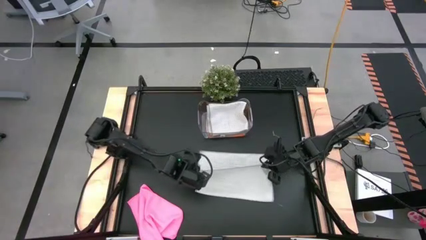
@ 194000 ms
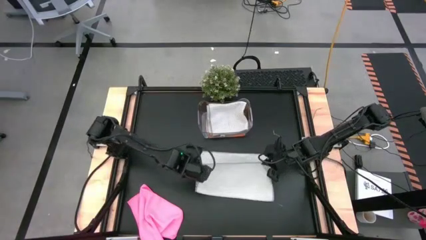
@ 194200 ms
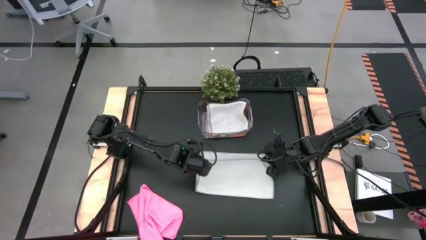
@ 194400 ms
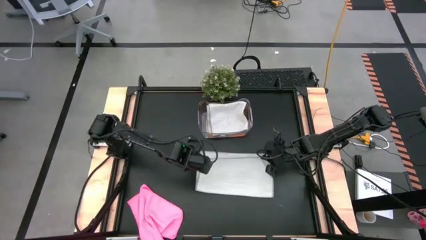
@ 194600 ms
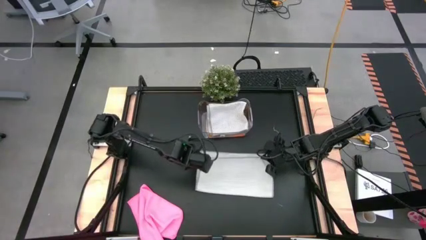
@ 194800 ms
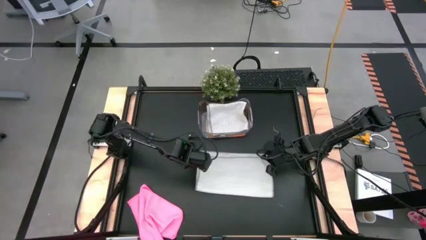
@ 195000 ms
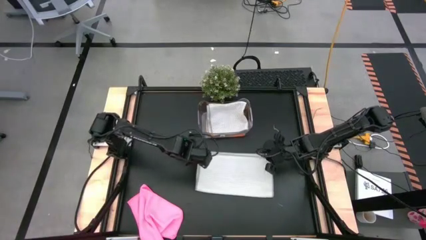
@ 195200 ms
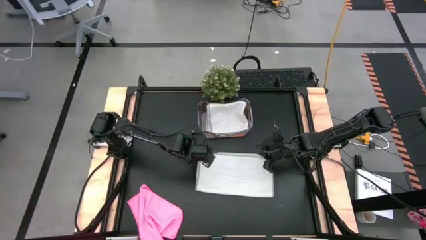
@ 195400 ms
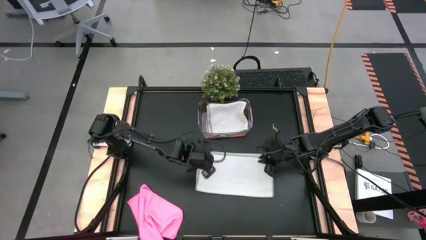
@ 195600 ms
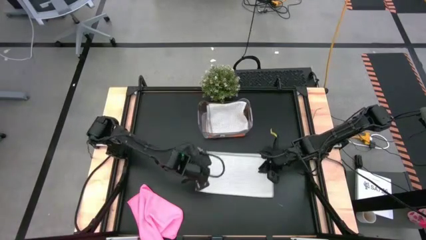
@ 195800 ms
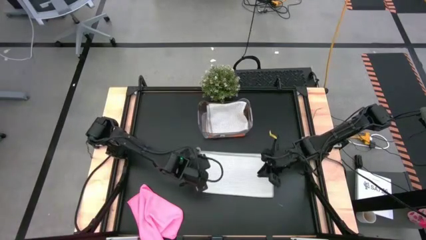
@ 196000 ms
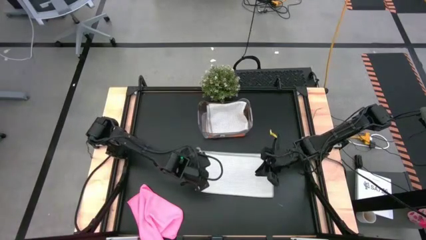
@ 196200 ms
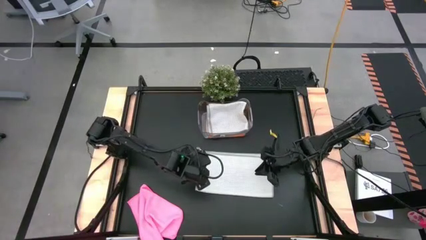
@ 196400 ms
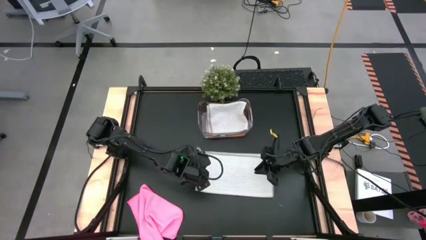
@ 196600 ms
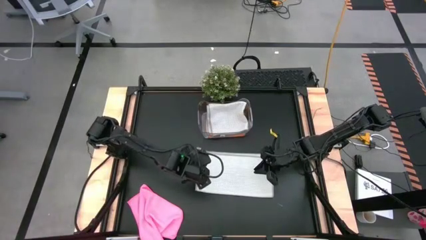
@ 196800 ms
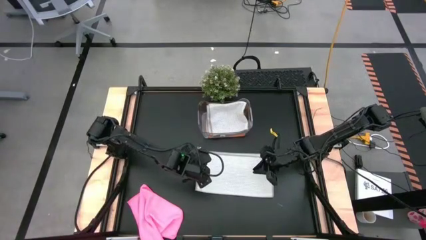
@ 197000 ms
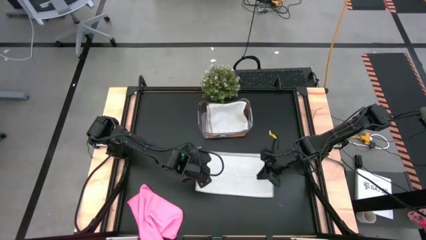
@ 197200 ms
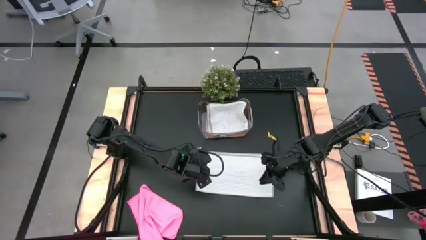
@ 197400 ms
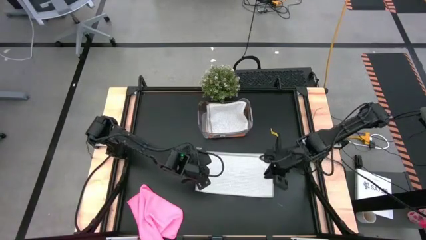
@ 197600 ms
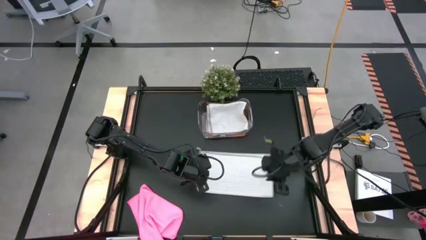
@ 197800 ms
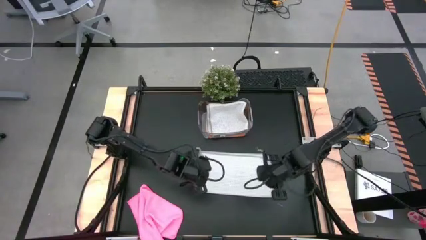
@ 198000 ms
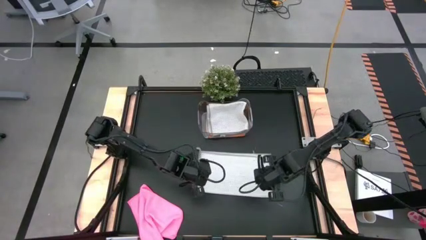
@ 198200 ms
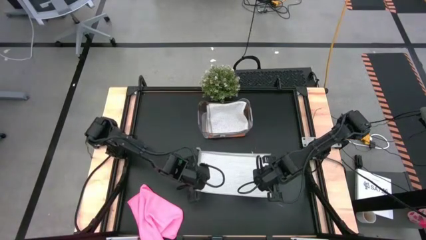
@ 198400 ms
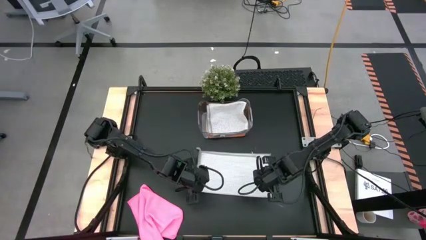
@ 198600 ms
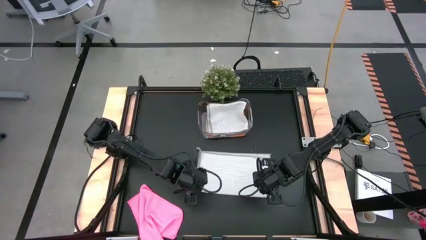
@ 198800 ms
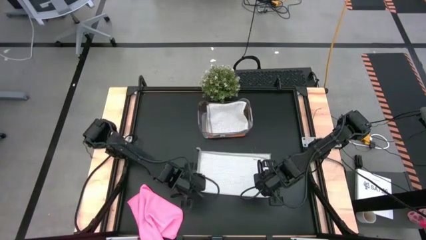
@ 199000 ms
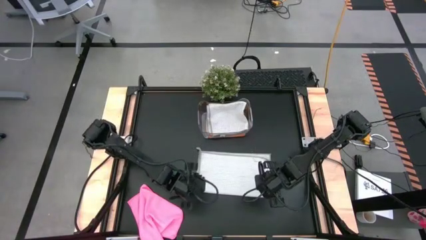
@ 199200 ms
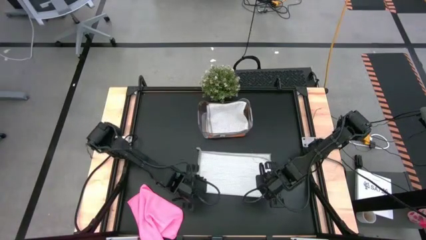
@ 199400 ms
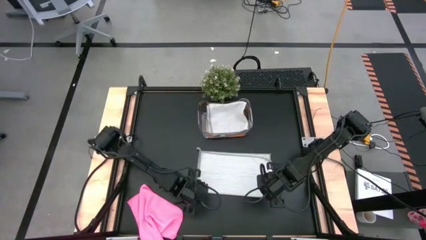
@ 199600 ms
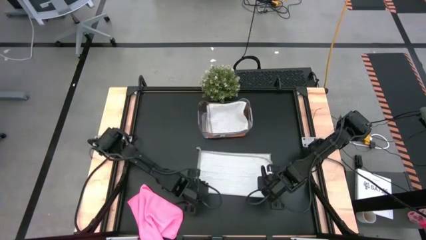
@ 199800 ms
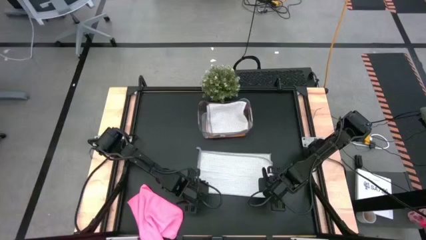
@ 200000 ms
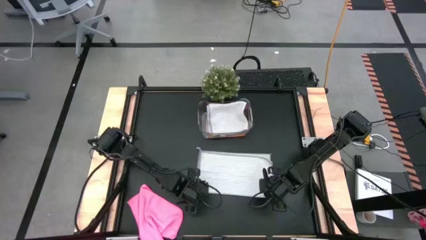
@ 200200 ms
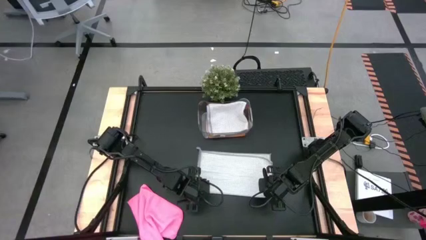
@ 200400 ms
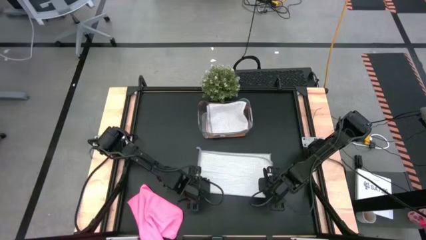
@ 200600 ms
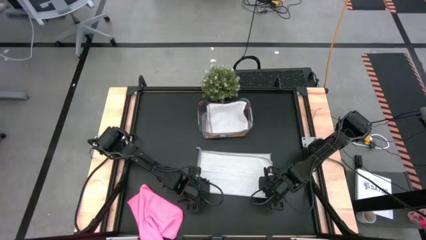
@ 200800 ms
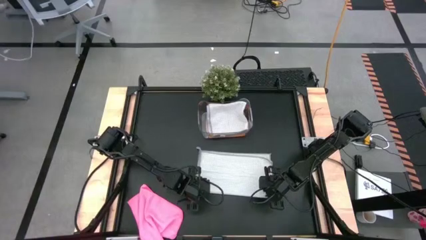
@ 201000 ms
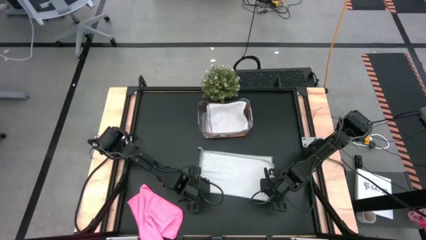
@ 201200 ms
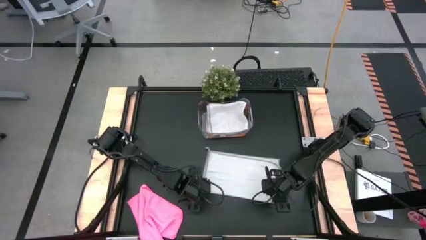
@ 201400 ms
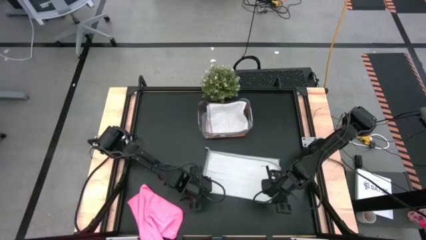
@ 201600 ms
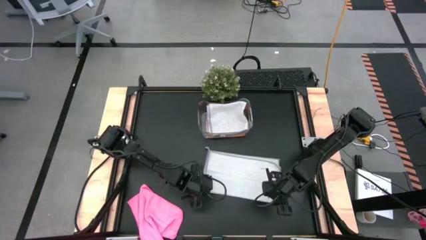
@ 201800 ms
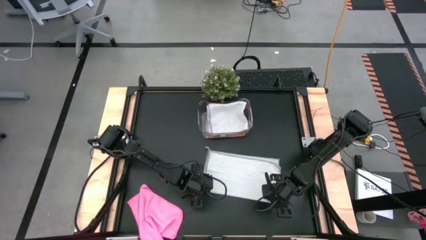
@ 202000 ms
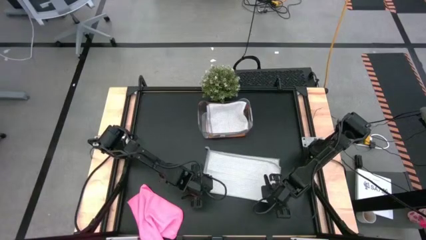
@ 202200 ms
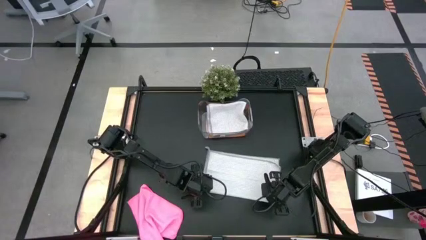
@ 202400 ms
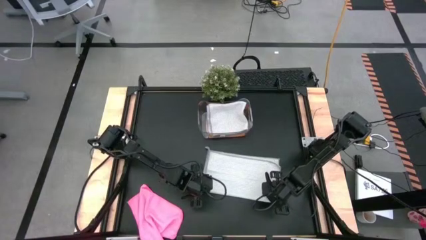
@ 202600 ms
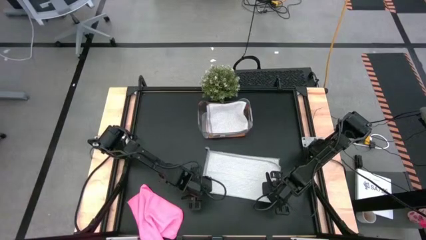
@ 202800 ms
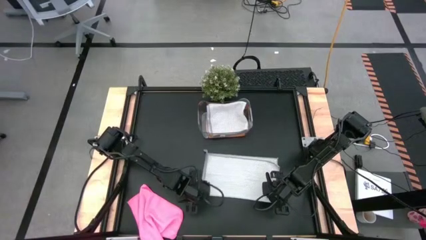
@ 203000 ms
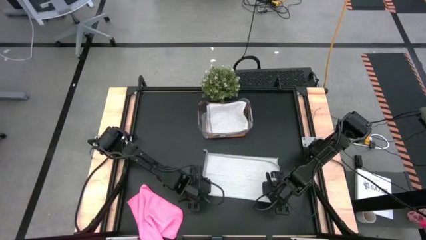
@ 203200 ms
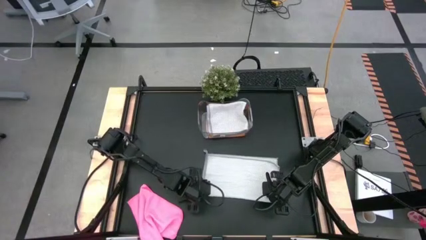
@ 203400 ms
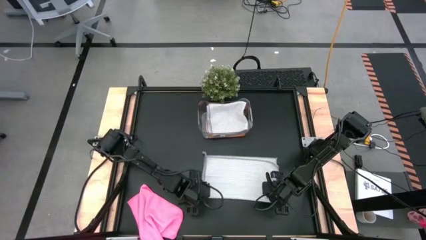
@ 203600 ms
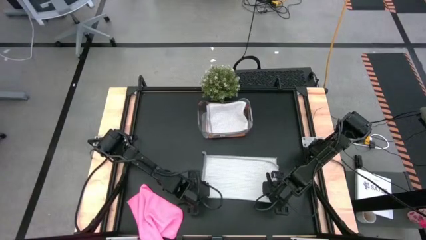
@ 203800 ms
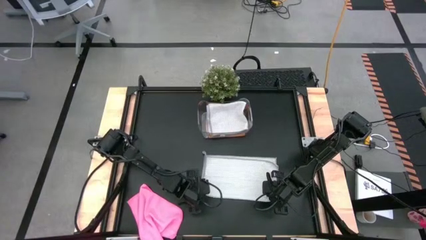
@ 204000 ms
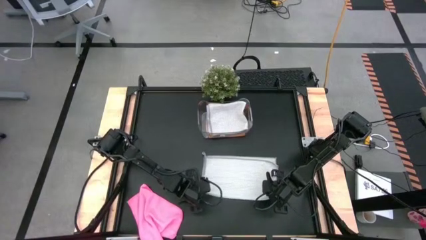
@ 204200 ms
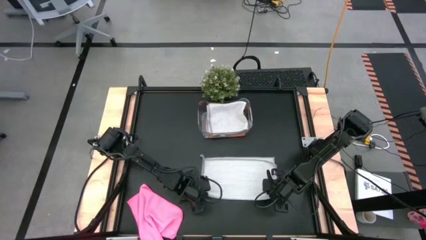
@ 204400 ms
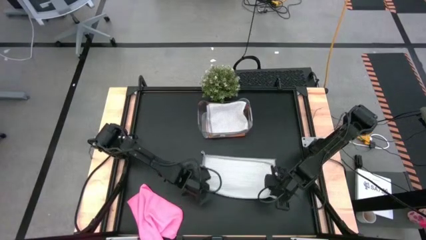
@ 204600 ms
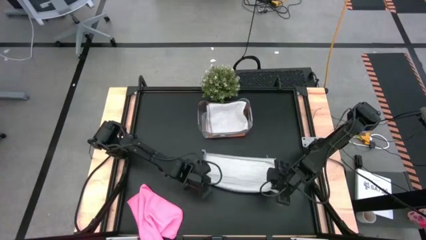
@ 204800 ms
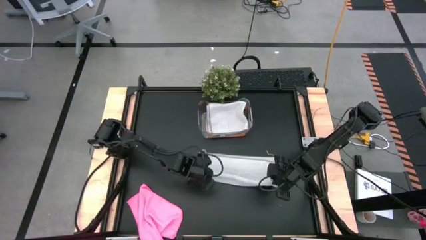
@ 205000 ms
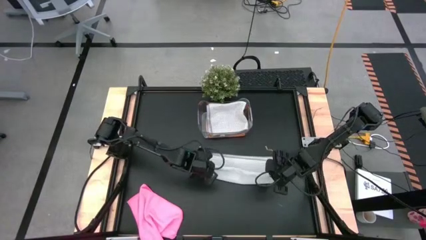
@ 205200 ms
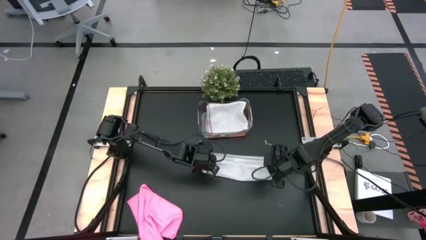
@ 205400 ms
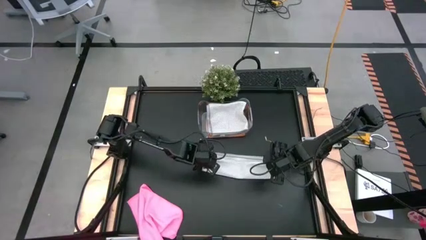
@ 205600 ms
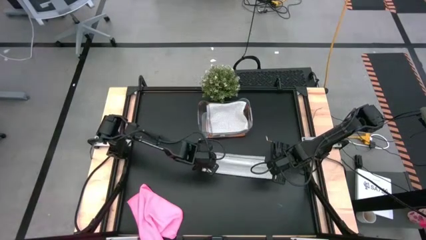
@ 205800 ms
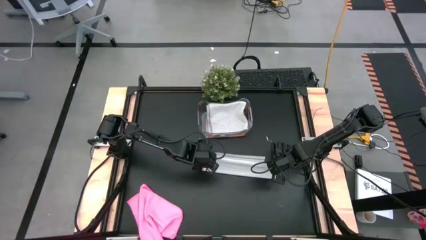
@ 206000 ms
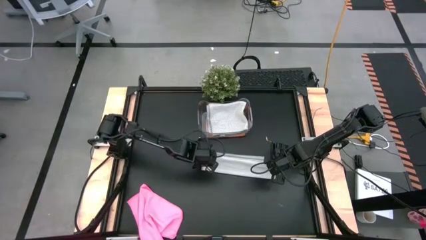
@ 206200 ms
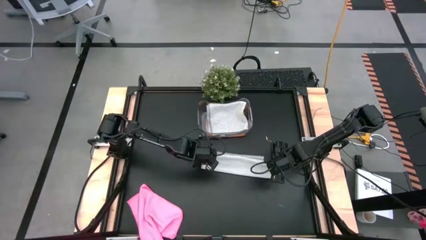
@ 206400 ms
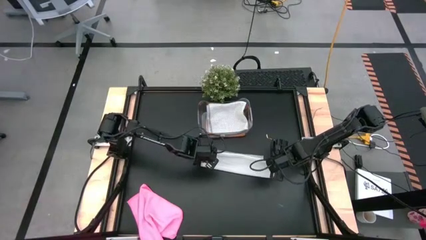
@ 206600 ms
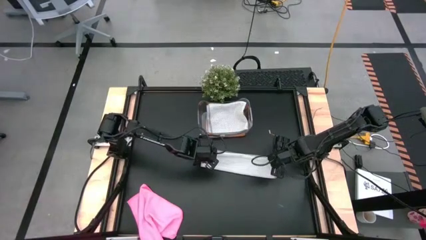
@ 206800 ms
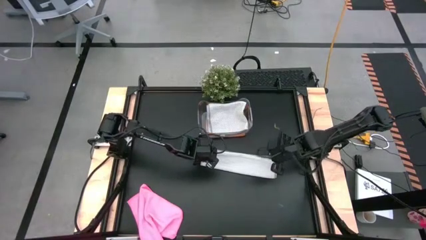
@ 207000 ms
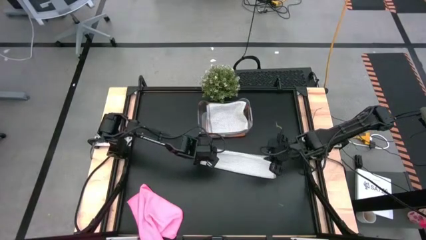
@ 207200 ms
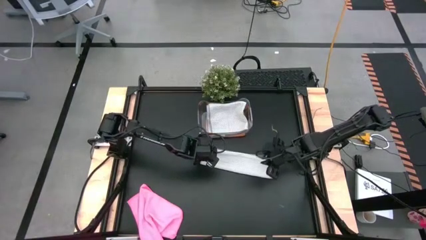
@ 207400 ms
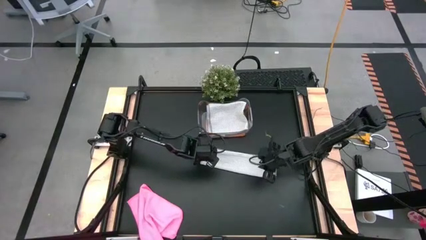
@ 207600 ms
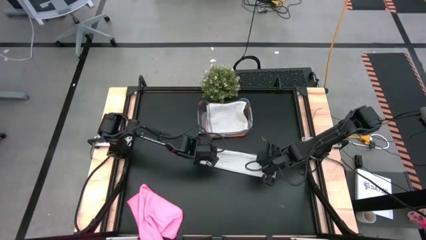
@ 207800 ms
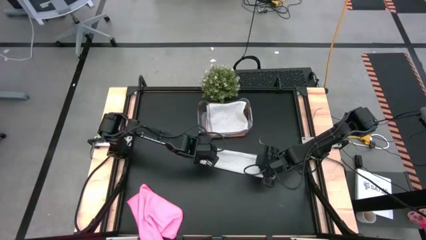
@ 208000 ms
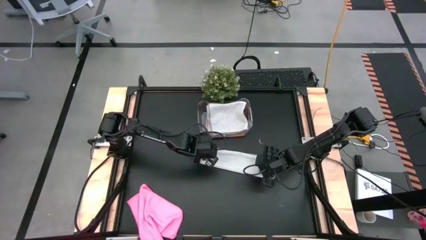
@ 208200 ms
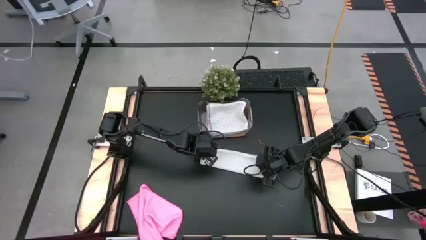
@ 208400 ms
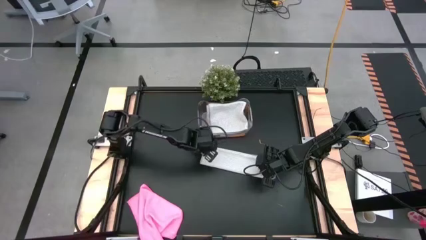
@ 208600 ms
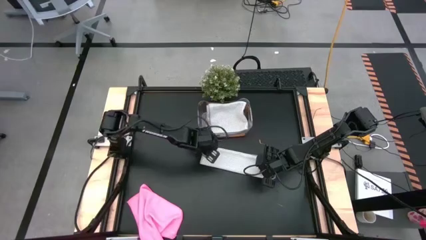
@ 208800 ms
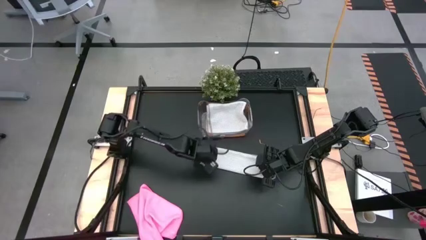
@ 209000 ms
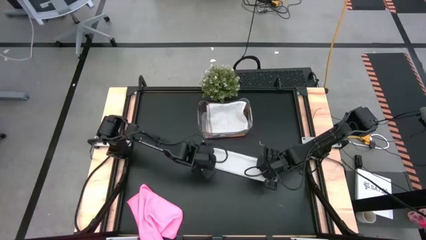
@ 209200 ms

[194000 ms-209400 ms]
Task: Fold microfiber towels
Fold the gray microfiber towel on the table
